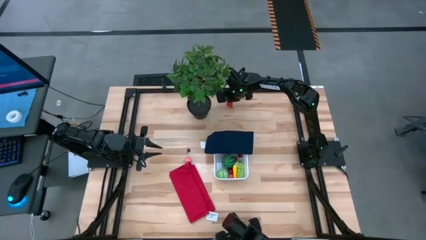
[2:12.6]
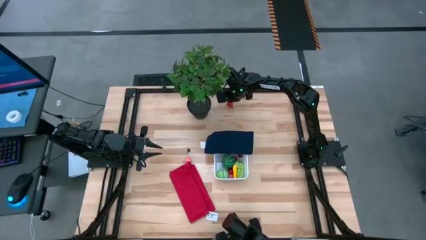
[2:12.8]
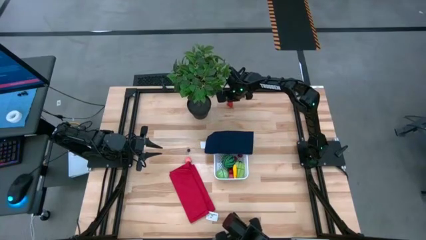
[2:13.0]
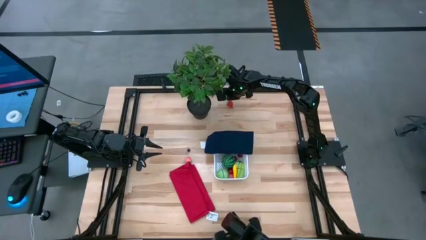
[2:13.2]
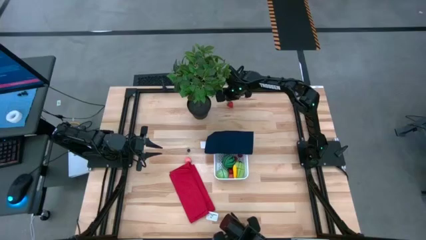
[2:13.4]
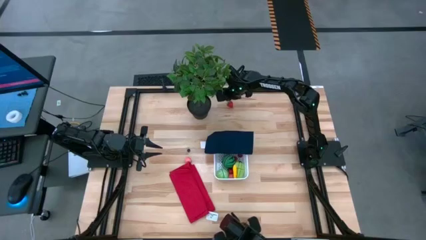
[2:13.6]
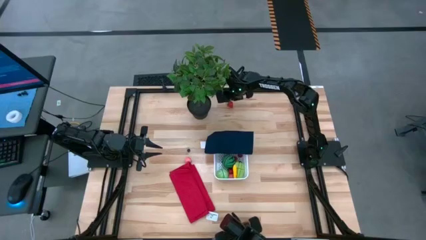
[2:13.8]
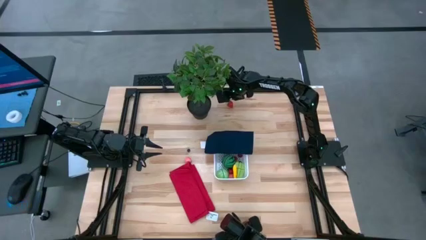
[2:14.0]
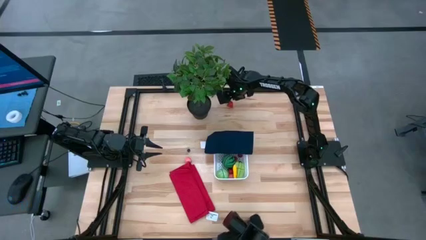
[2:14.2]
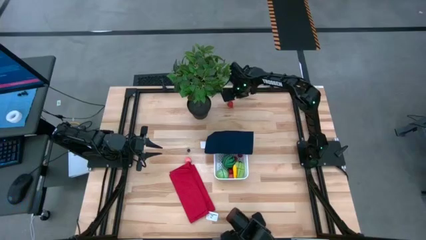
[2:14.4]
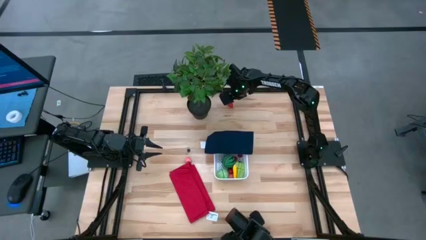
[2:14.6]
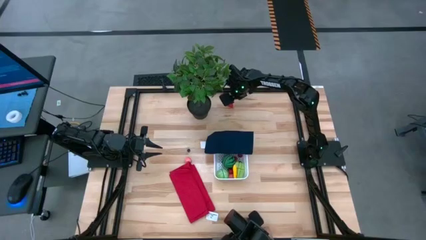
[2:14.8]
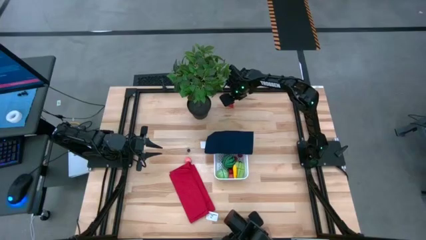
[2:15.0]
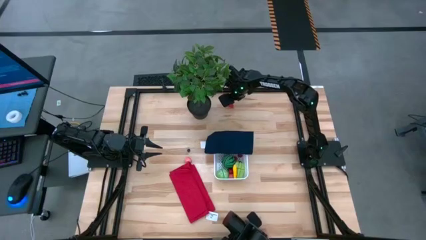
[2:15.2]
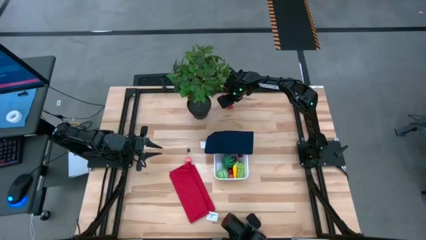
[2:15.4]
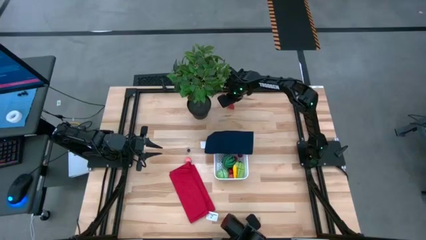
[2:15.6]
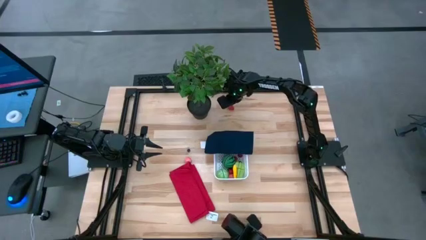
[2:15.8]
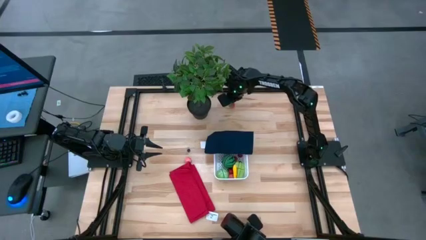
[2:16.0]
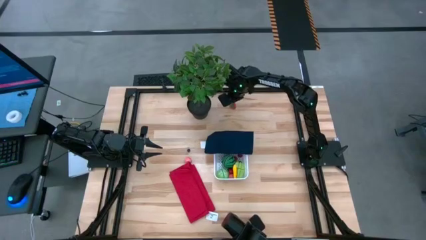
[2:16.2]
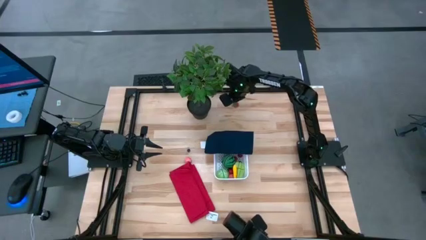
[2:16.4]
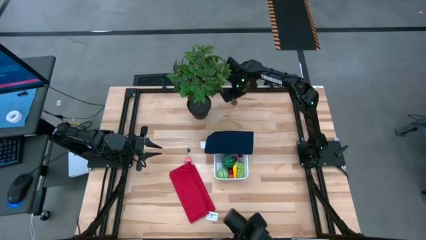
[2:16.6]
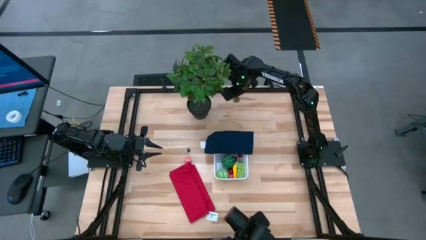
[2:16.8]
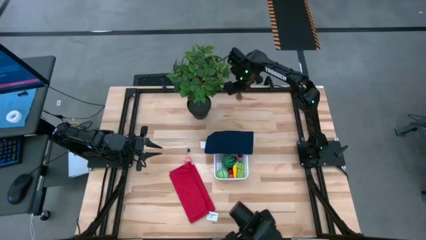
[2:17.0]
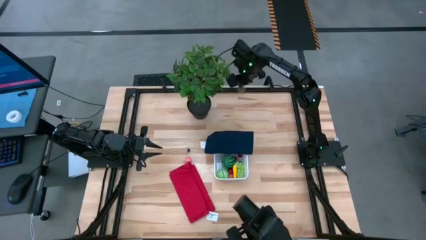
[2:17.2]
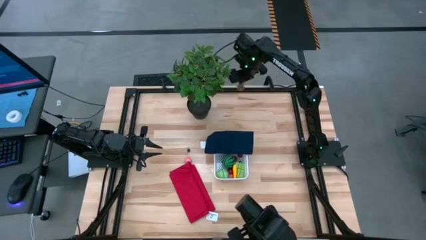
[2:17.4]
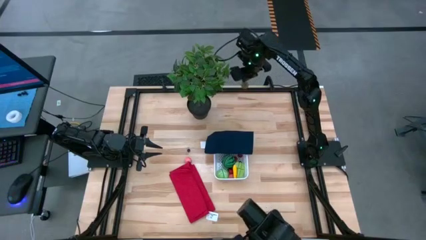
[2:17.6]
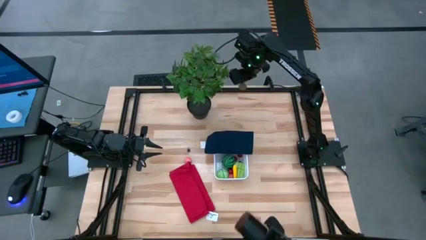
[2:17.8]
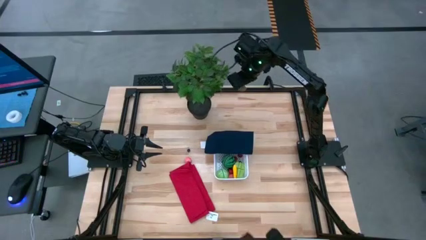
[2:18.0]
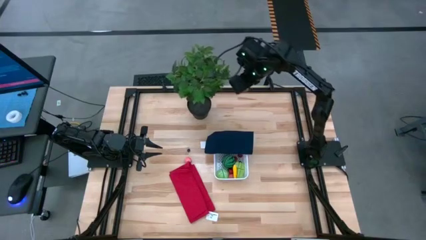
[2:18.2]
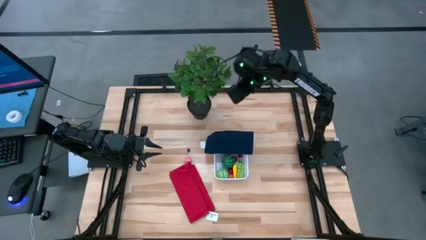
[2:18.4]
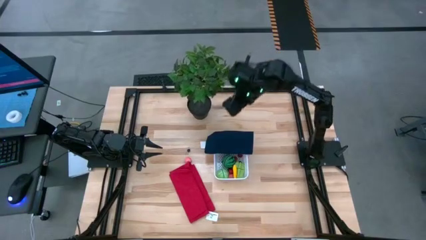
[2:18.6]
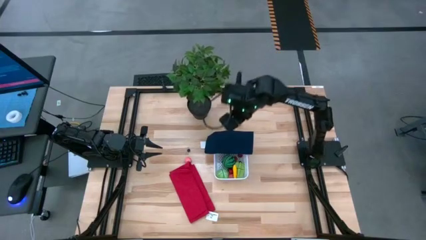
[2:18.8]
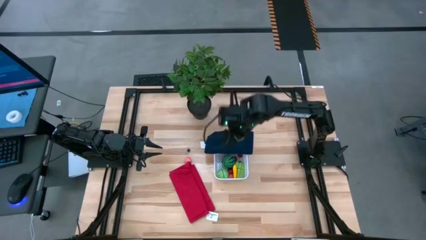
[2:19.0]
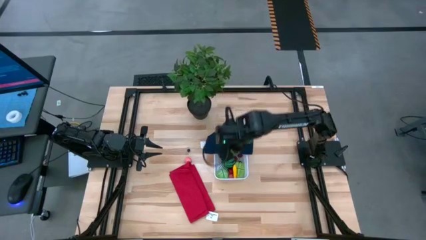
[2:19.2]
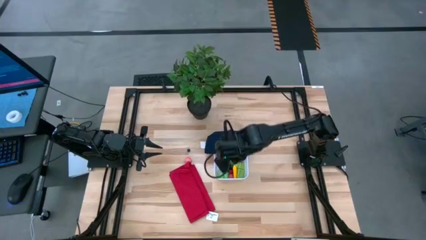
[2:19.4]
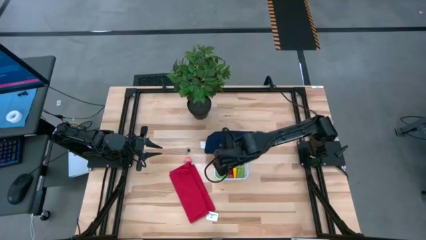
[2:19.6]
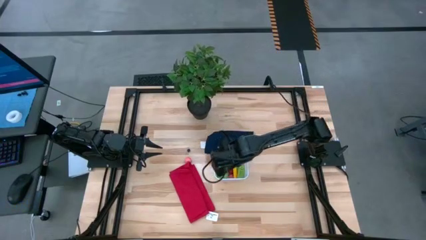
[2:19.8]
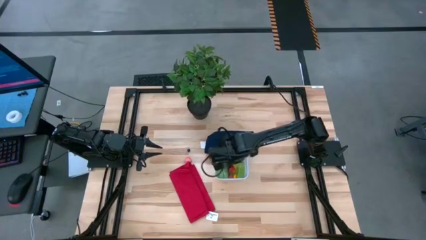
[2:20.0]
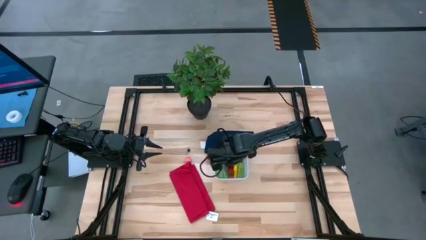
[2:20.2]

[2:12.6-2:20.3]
Task: Pick and placing Produce into tupperware
Put the strawberry into the bin

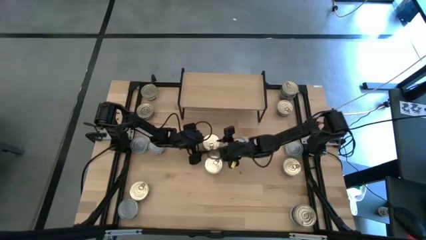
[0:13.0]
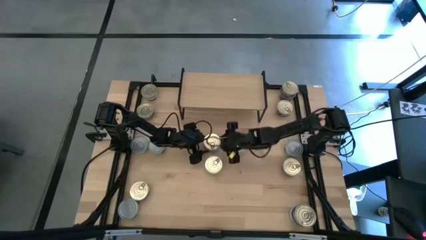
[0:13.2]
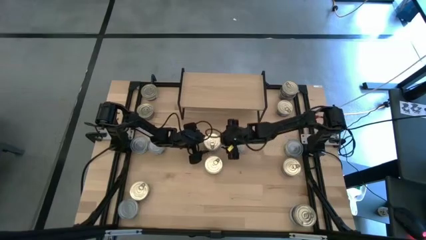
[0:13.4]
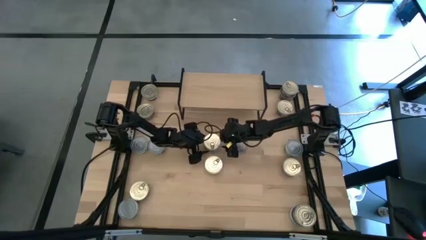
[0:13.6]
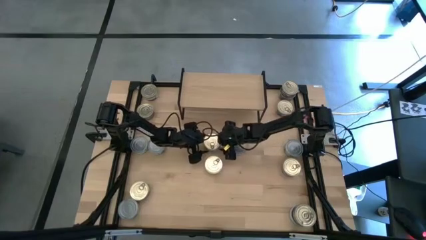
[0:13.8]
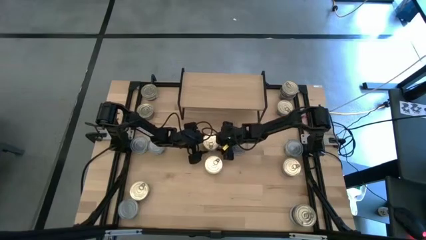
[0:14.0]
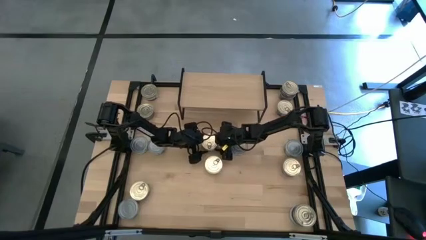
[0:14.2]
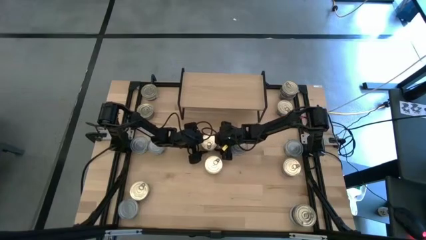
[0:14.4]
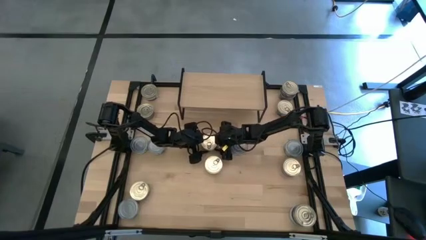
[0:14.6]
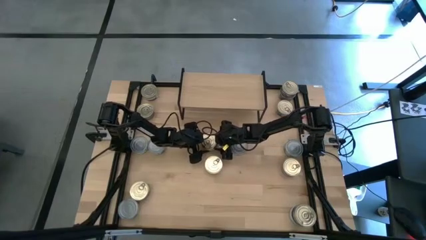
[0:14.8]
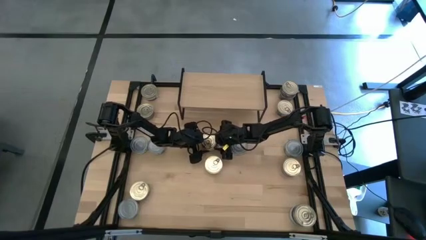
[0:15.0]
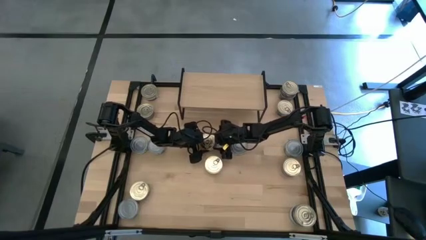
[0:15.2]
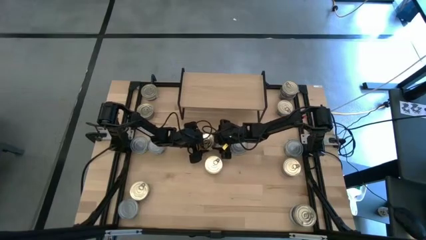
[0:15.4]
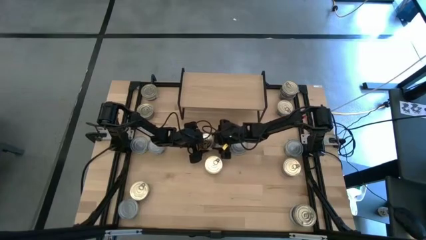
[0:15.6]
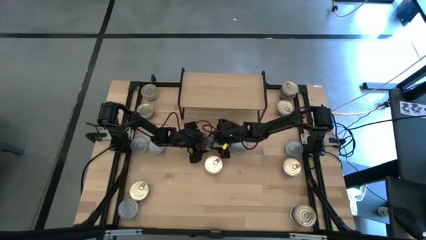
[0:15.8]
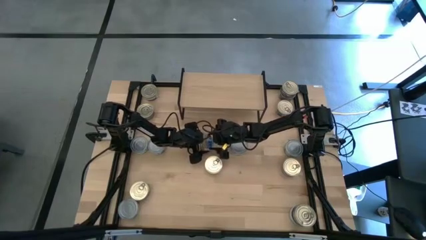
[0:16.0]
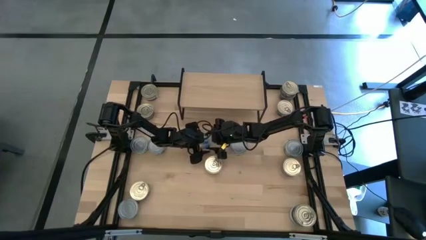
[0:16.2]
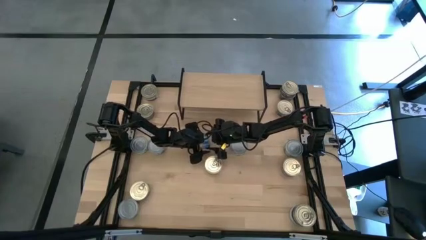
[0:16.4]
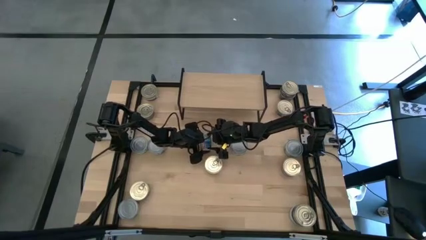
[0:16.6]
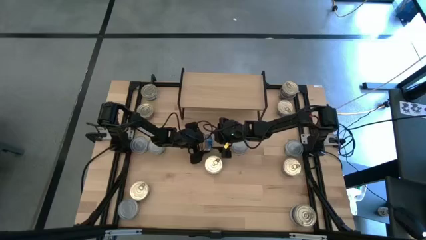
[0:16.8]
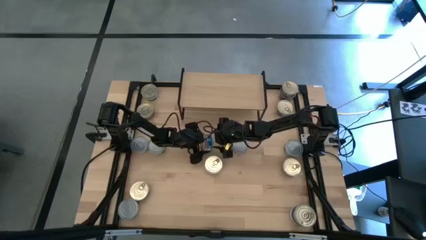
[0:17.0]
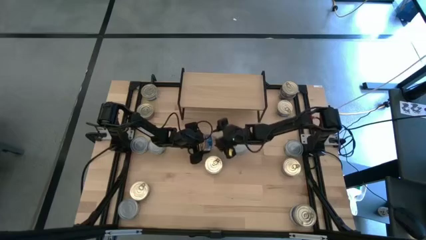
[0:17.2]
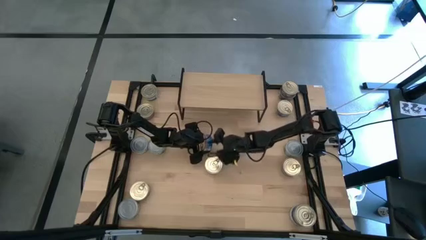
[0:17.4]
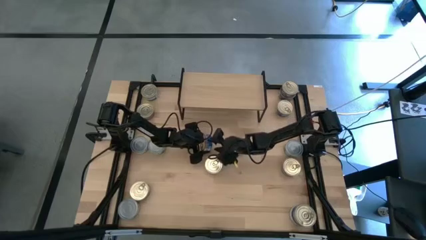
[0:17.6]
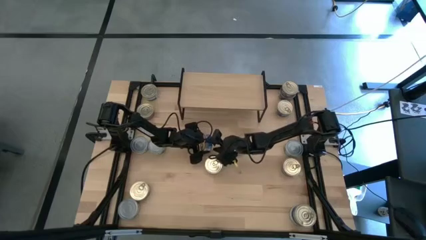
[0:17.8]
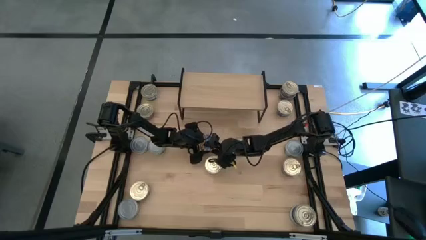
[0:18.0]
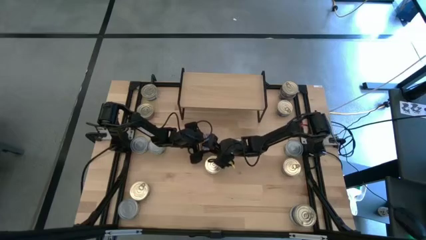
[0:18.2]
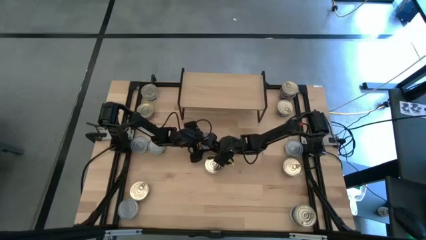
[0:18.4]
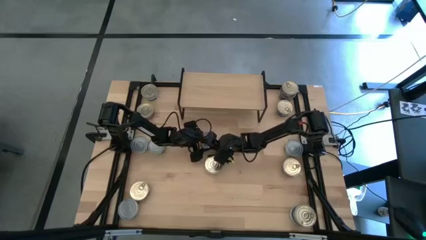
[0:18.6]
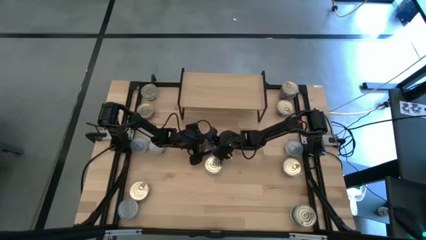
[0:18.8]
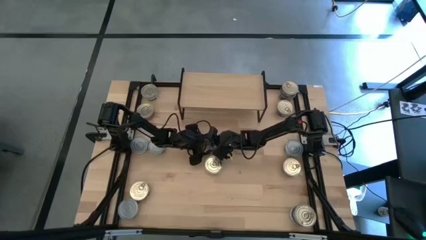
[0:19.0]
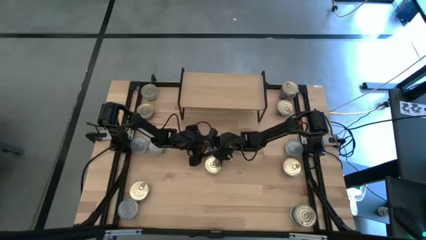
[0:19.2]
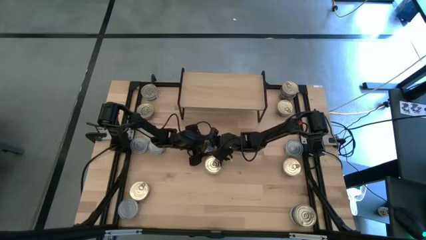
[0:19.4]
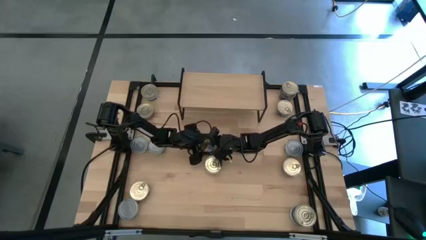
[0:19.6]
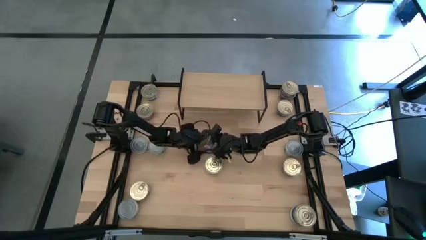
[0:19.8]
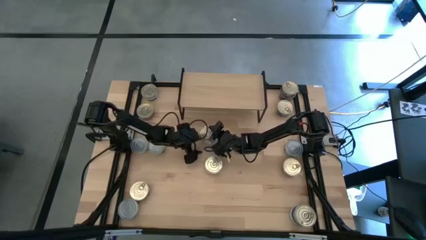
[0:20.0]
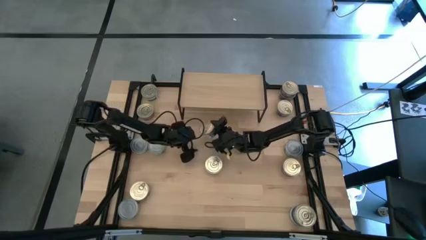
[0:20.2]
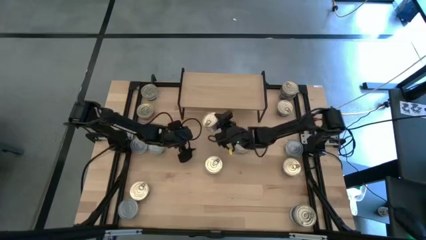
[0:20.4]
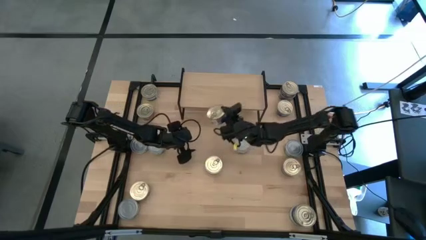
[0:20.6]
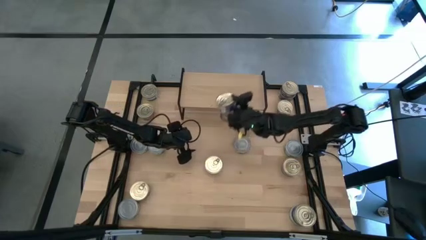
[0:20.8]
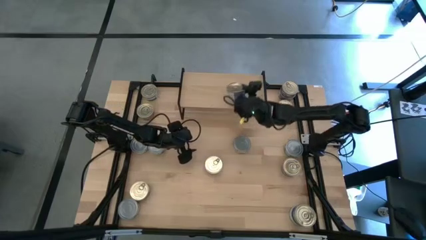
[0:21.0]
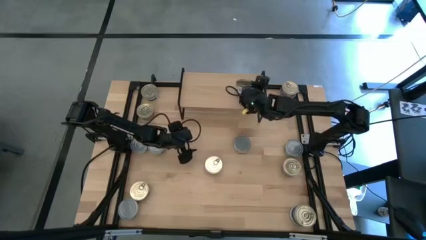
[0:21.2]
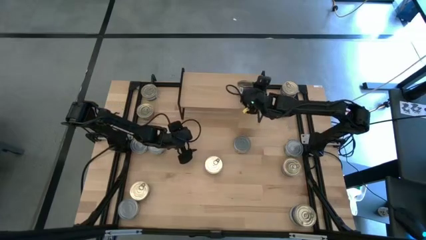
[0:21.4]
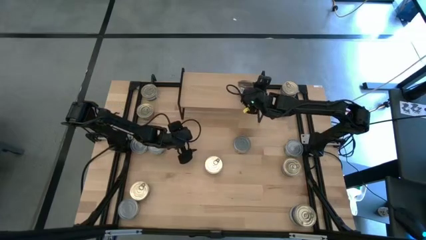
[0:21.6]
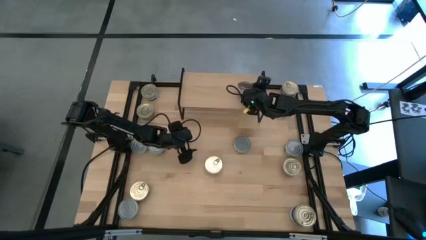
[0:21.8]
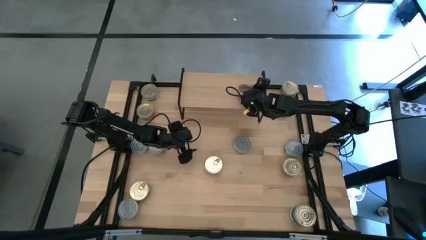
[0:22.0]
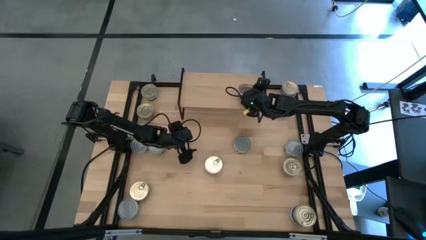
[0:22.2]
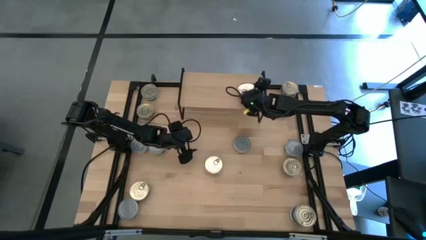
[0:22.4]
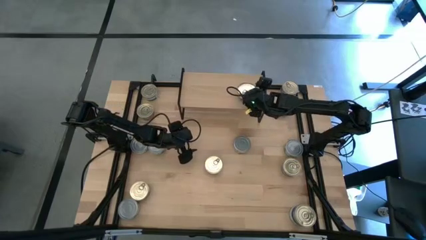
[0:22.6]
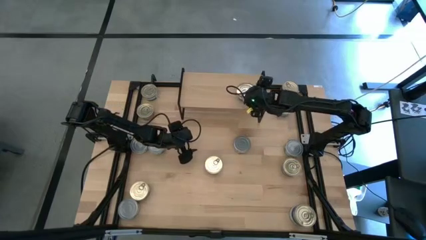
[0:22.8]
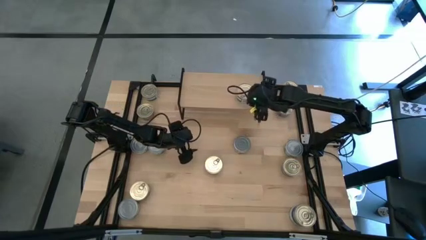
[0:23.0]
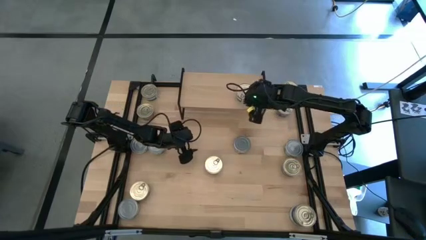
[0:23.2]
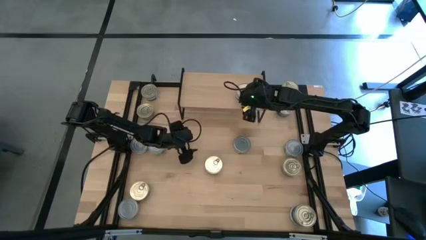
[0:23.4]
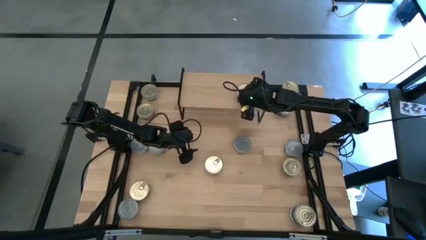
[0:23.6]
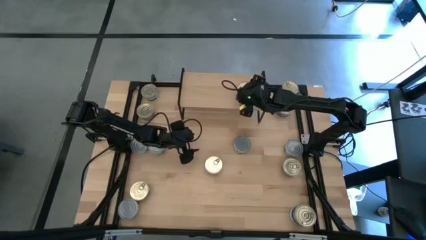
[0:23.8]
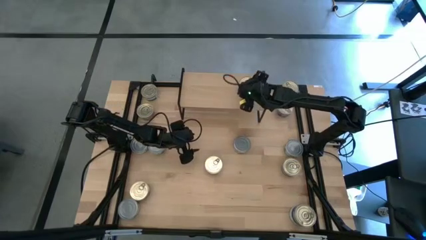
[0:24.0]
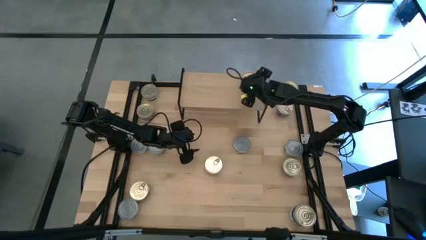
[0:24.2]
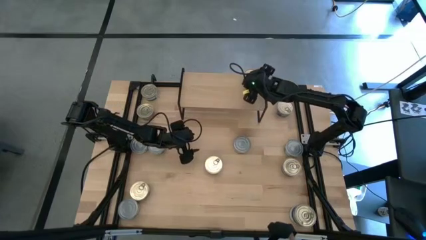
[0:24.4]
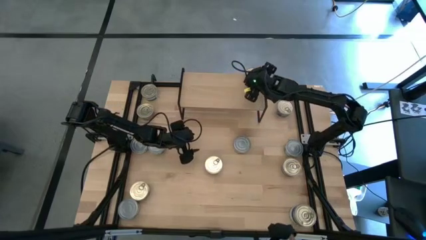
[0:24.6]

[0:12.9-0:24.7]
Task: Stack canned seafood by type on shelf
Put the blue pink tuna can on the shelf
